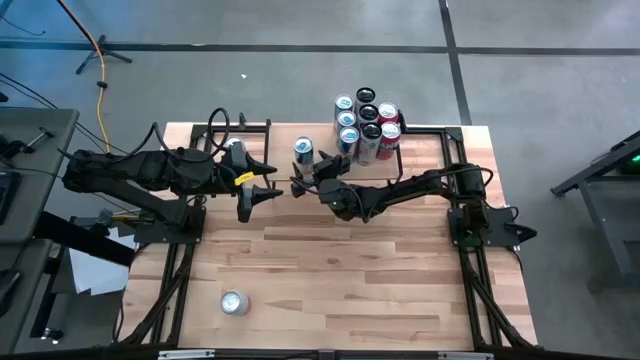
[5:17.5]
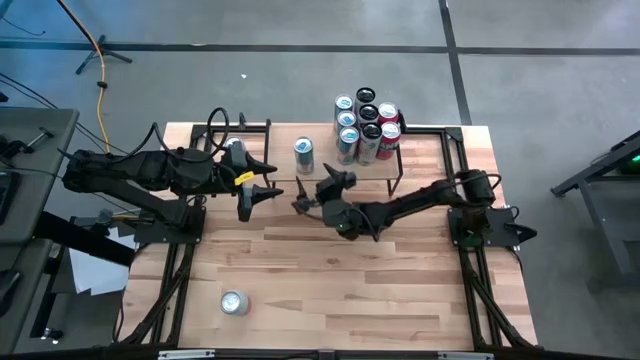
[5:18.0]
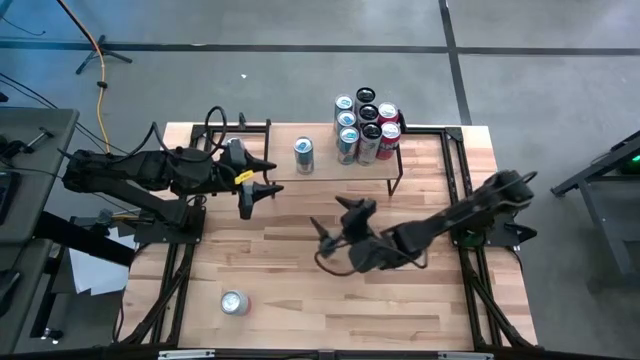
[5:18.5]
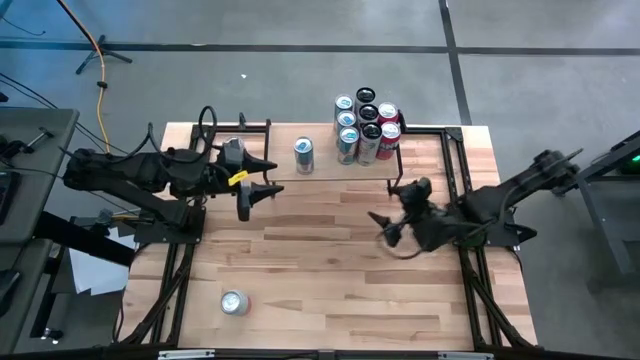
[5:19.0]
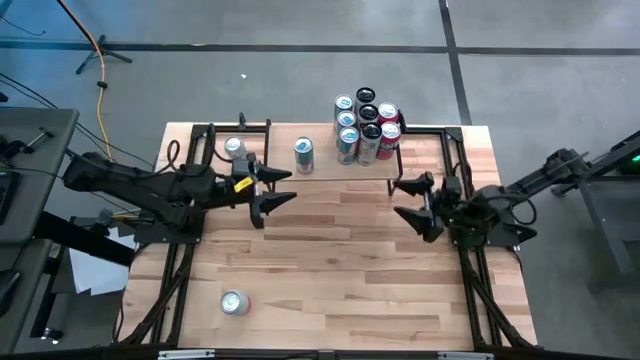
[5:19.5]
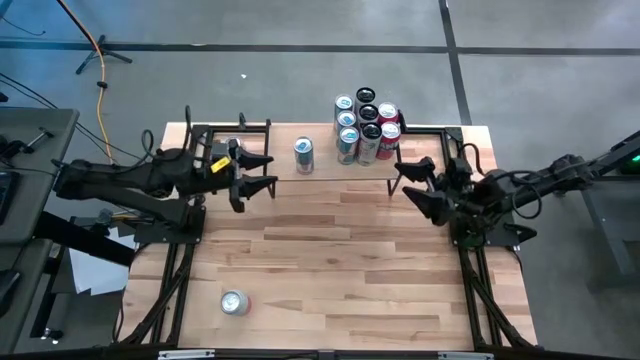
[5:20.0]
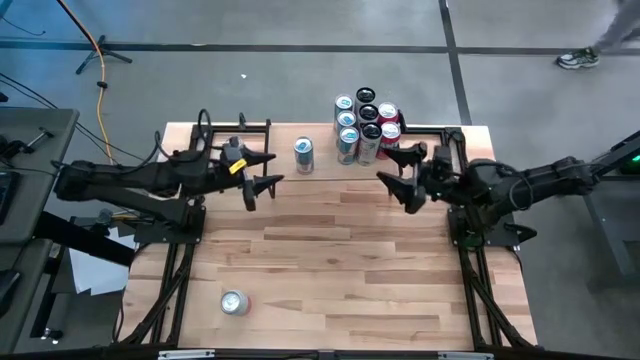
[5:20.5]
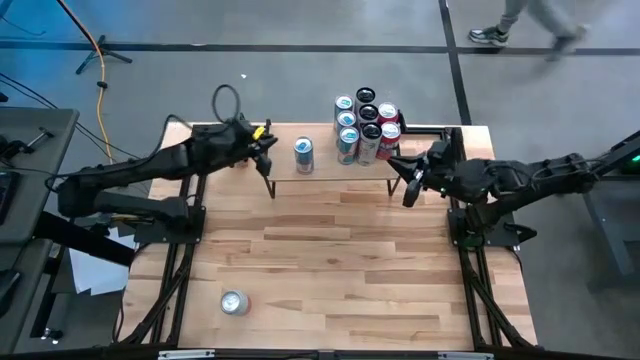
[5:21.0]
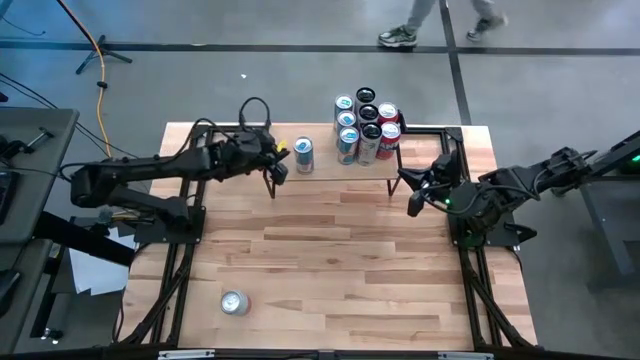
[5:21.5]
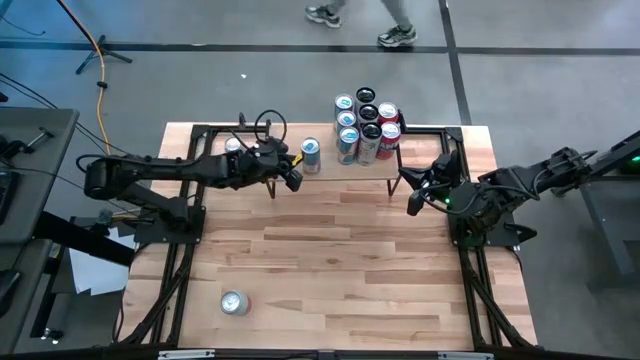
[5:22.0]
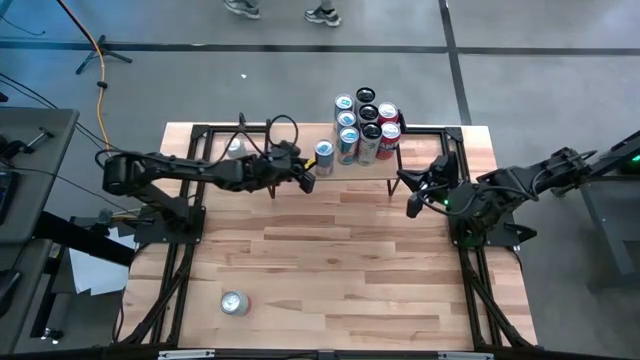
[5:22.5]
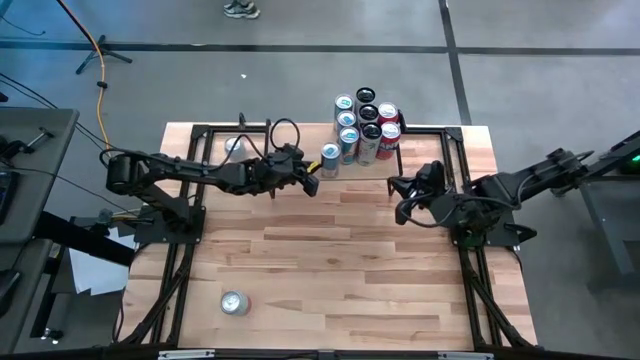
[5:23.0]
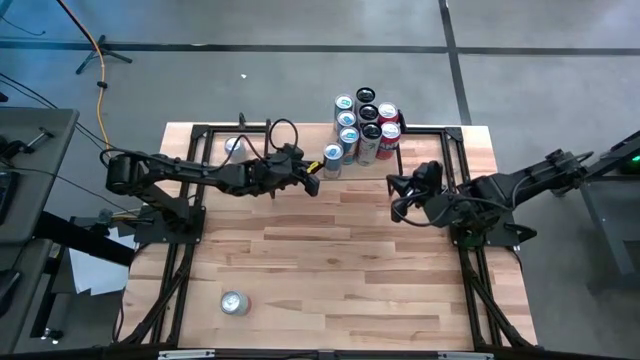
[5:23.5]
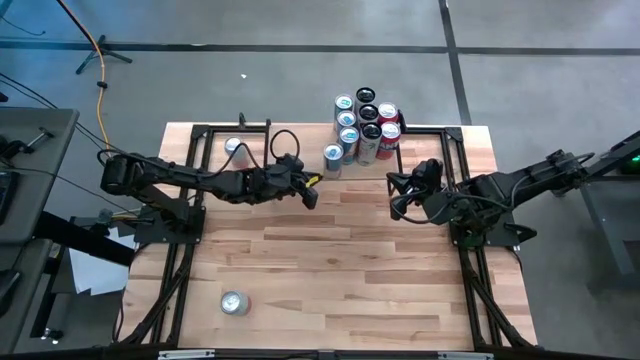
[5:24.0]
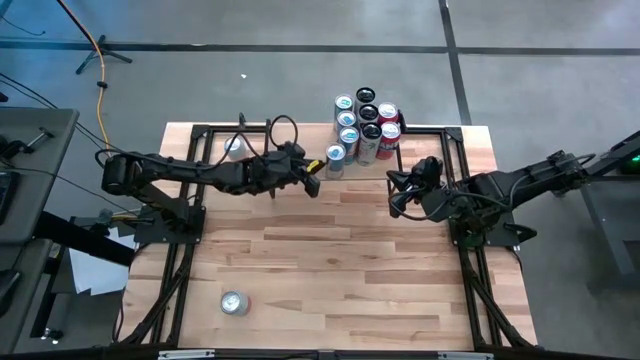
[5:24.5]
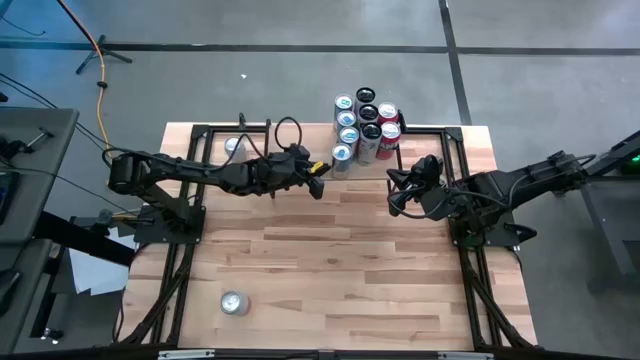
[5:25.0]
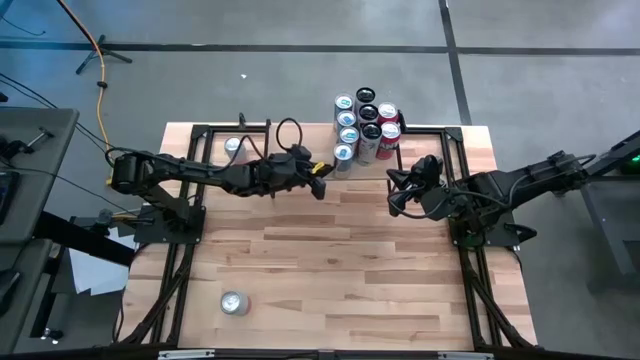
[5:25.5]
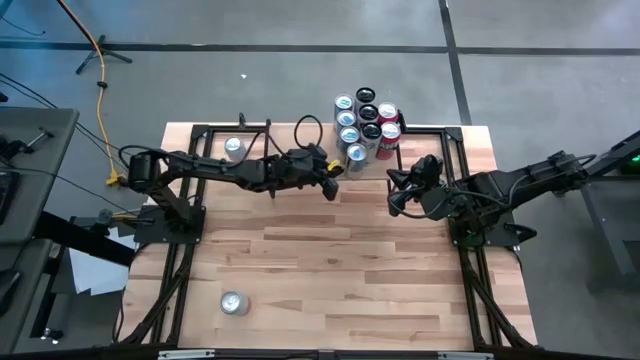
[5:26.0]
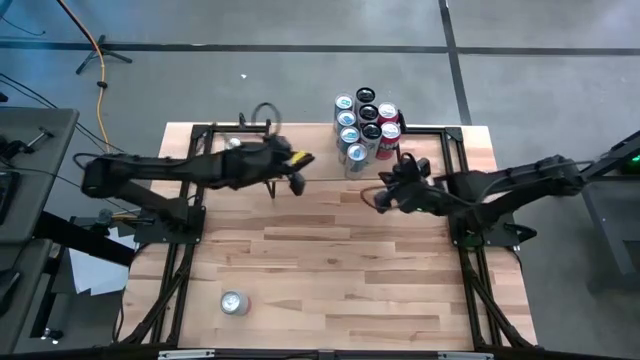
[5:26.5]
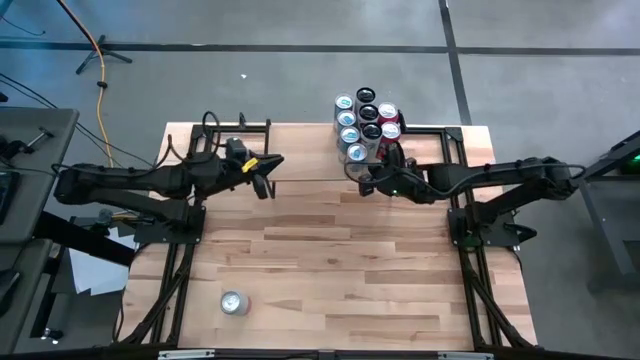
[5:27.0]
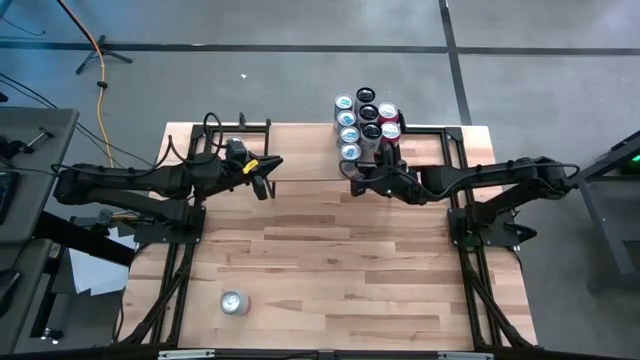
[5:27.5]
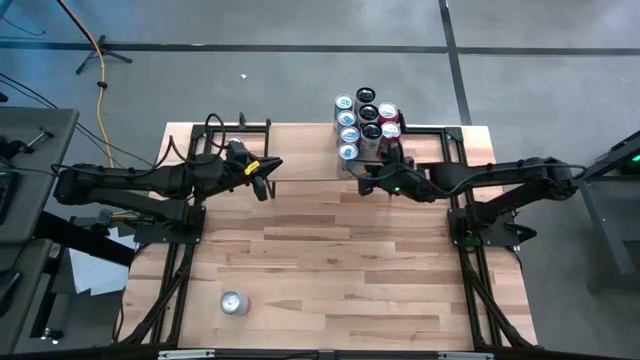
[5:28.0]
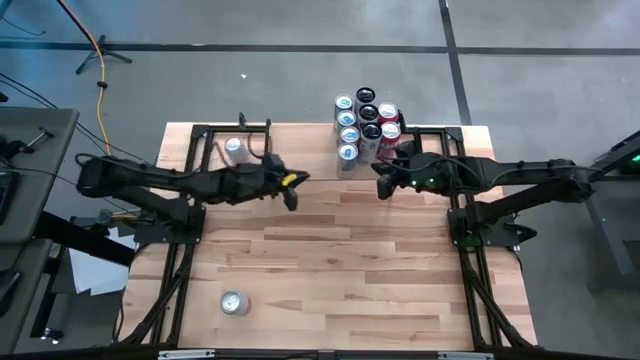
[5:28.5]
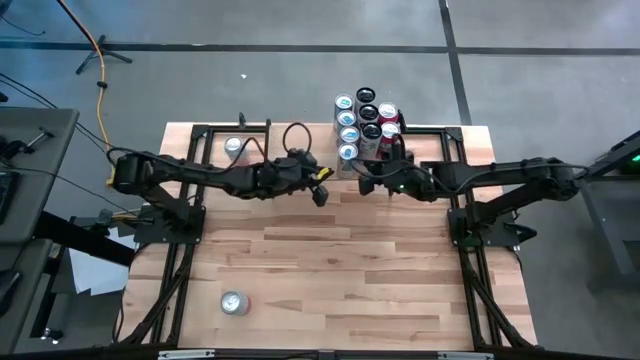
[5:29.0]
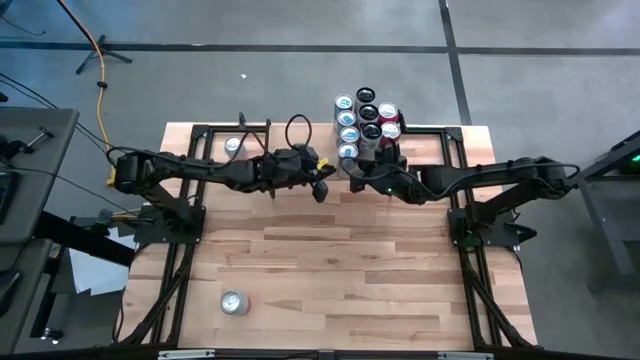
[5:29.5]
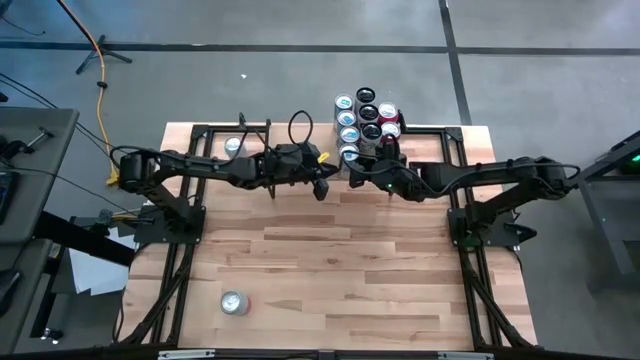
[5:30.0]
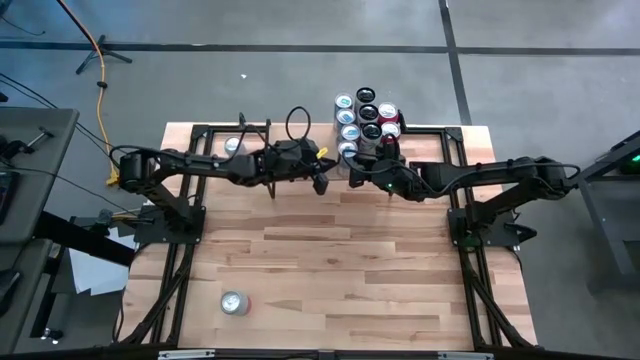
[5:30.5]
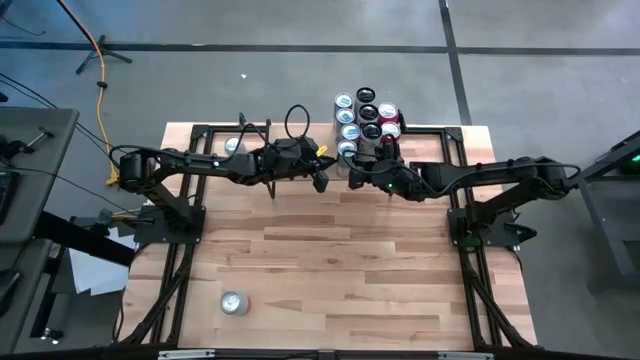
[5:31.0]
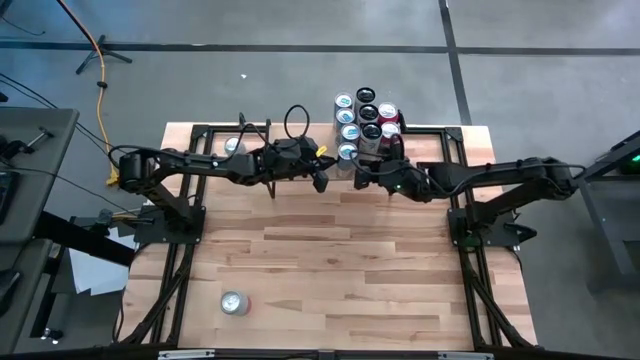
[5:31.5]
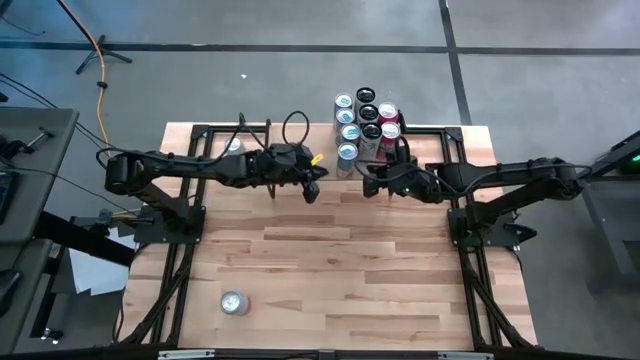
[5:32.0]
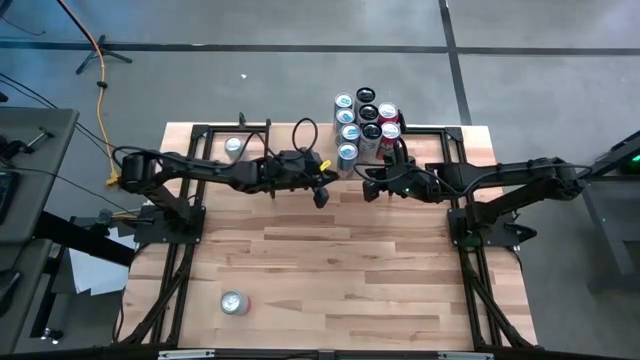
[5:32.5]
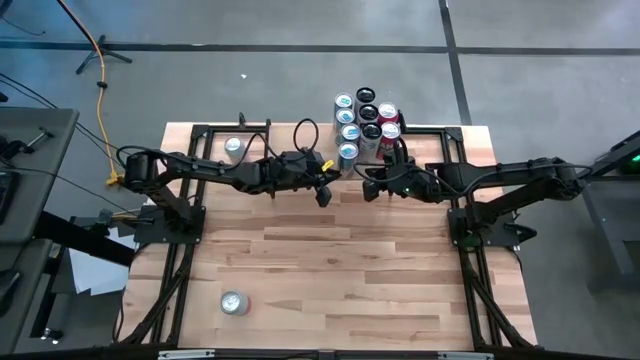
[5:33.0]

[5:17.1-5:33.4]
Task: Place canned beverage on shelf
Put the blue soda can on the shelf aligned with the blue soda can

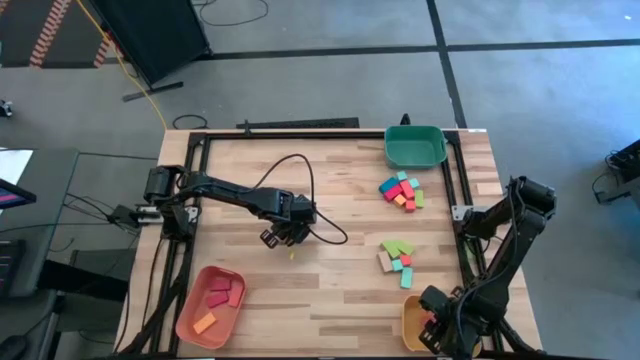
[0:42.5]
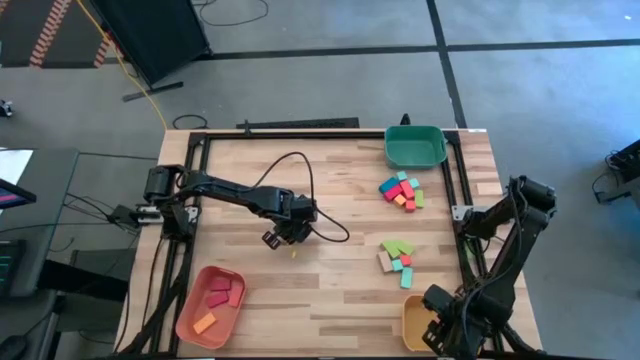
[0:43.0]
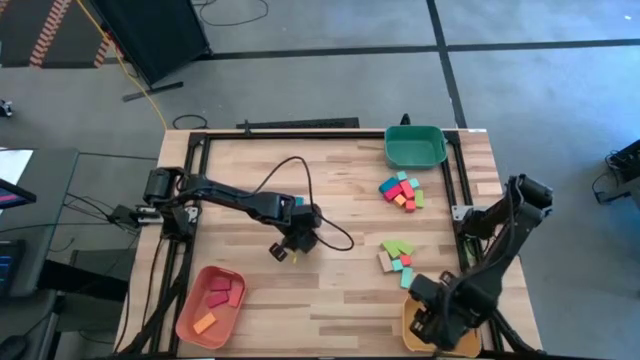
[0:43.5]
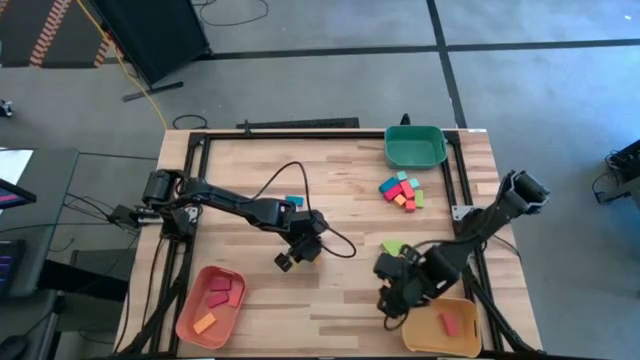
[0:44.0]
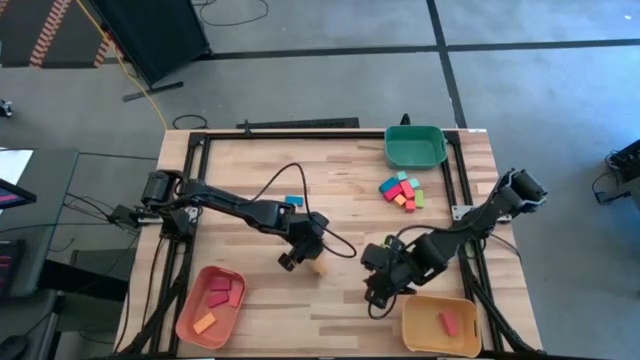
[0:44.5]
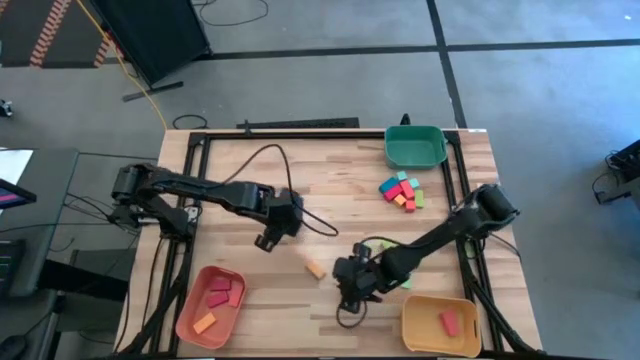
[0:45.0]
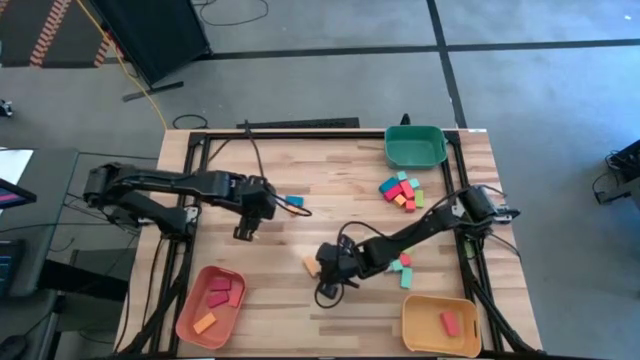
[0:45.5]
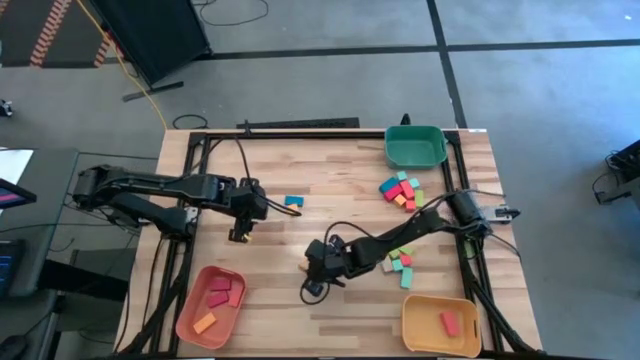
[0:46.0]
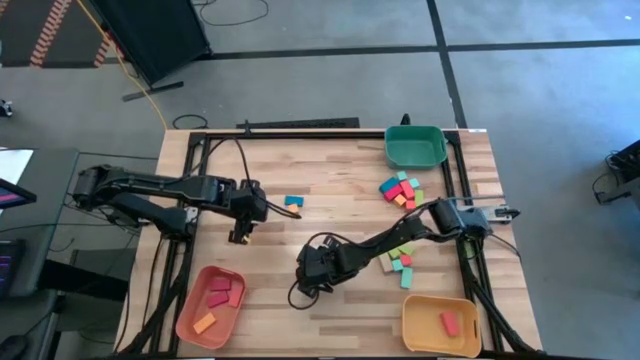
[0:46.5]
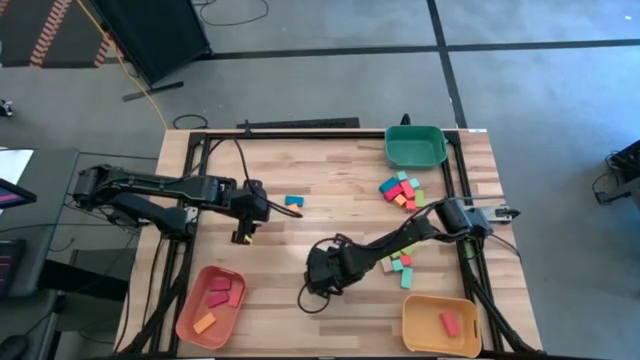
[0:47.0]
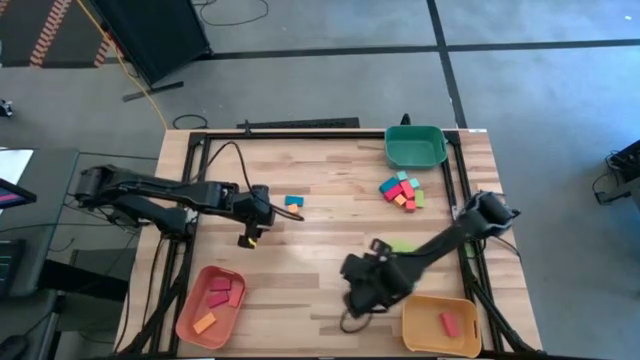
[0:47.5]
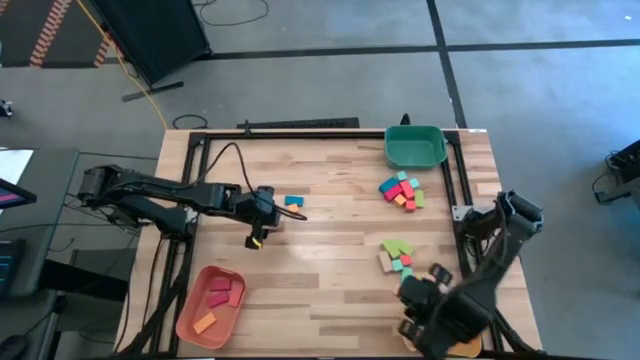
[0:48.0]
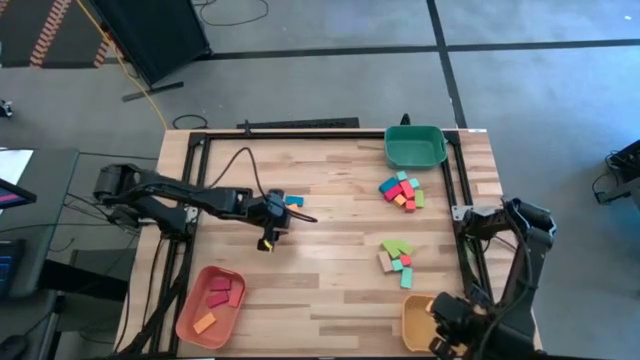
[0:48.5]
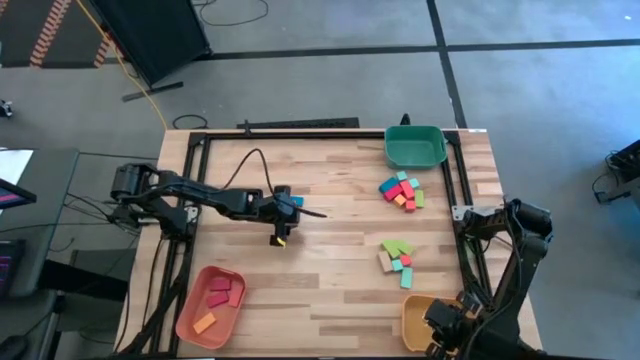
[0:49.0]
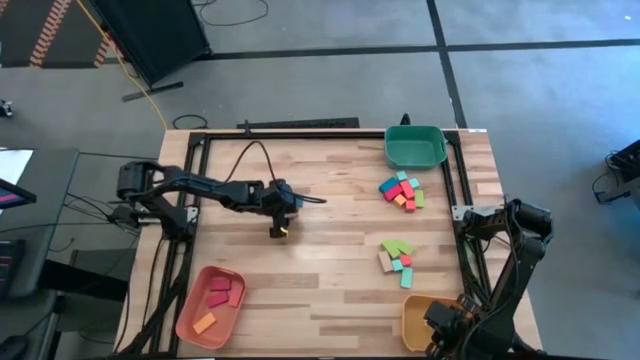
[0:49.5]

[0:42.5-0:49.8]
Task: Sort blocks by size
Put the large yellow rectangular block into the yellow bin
